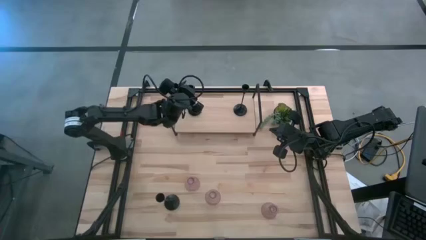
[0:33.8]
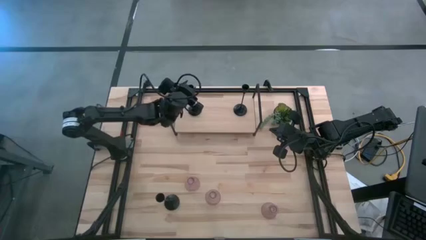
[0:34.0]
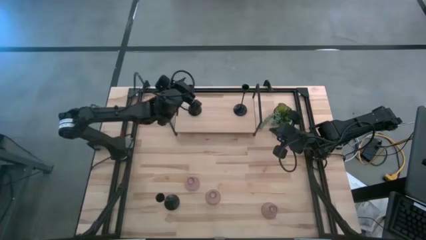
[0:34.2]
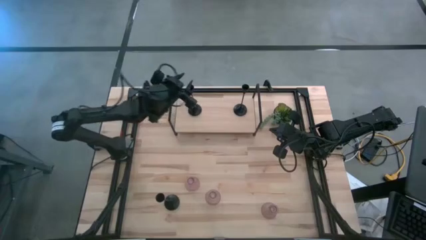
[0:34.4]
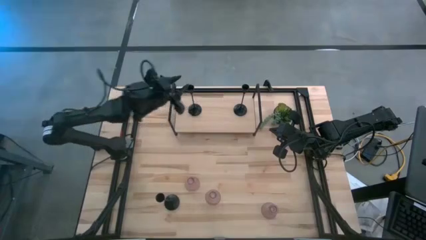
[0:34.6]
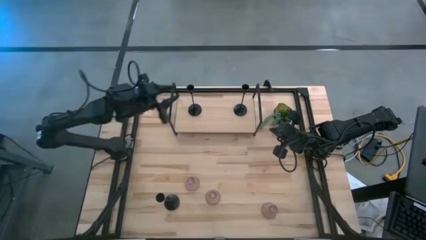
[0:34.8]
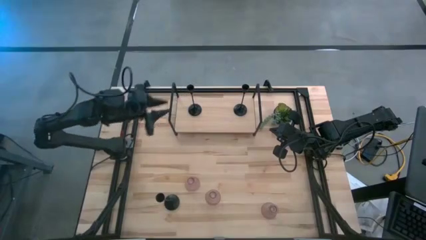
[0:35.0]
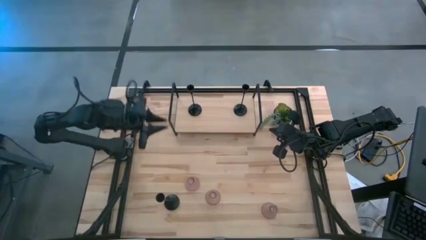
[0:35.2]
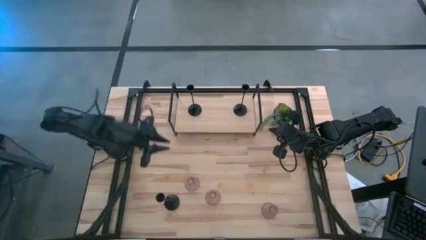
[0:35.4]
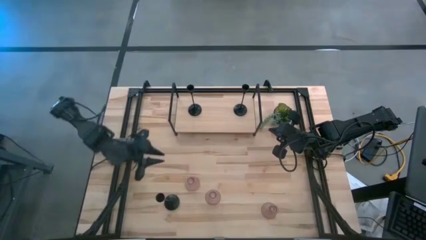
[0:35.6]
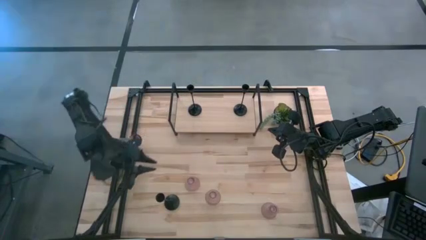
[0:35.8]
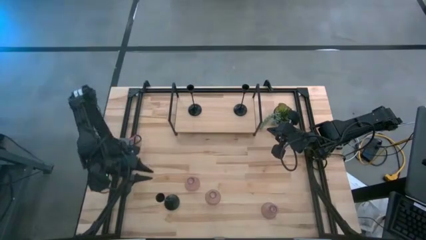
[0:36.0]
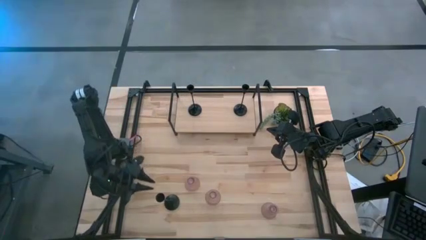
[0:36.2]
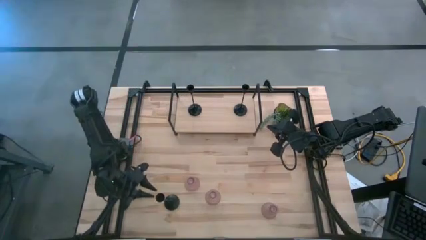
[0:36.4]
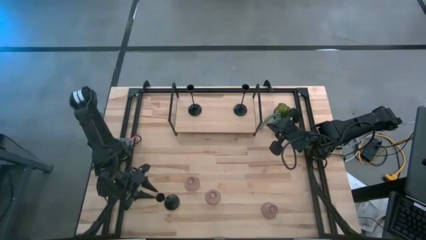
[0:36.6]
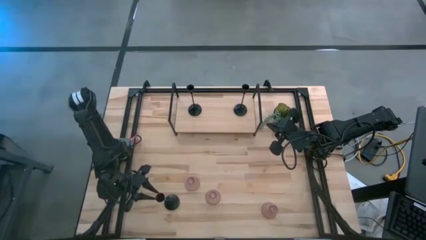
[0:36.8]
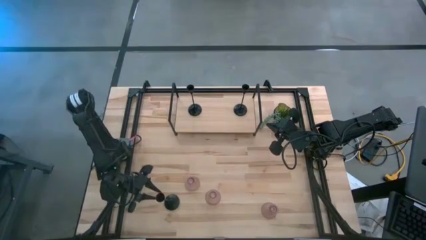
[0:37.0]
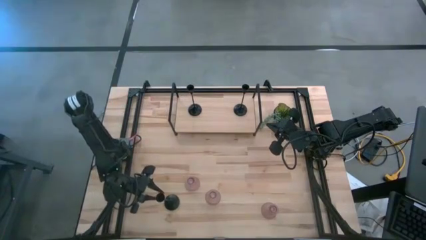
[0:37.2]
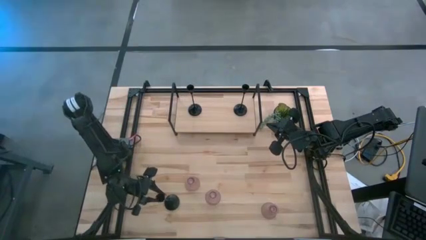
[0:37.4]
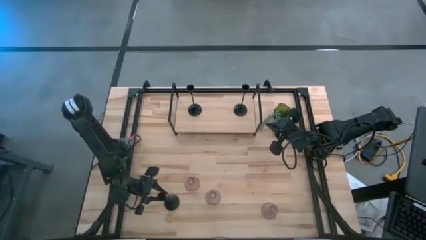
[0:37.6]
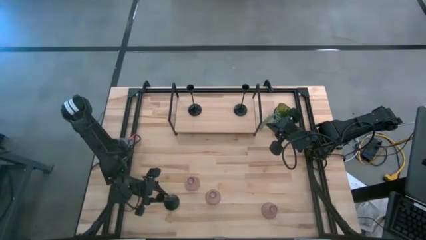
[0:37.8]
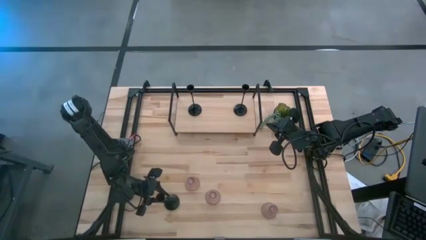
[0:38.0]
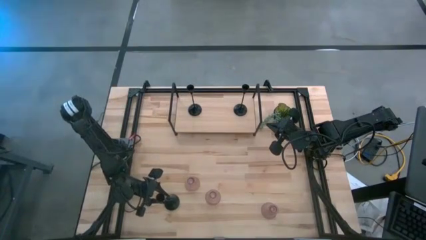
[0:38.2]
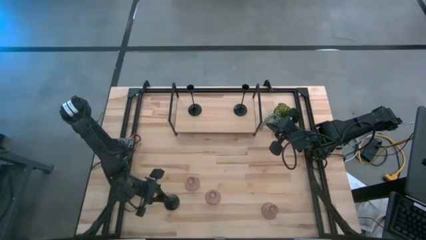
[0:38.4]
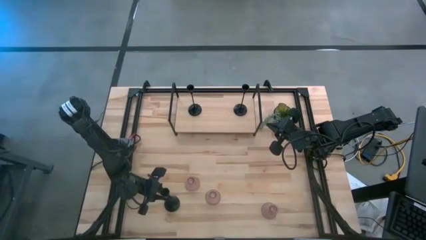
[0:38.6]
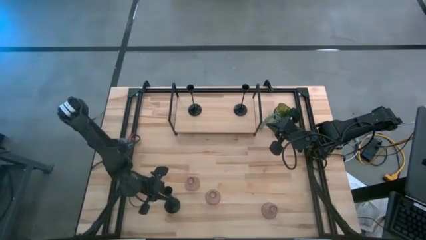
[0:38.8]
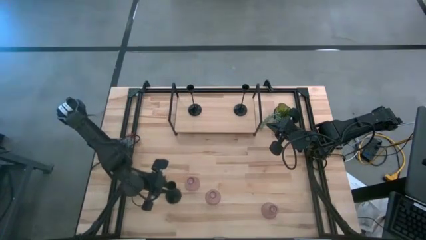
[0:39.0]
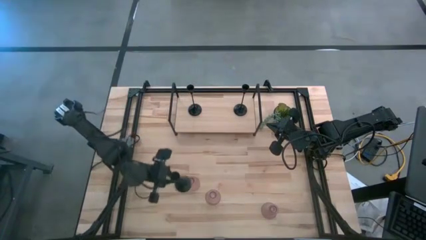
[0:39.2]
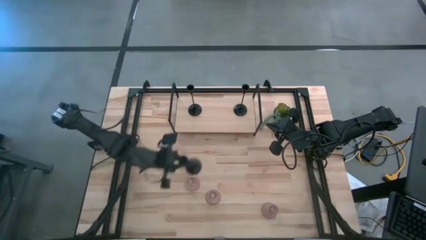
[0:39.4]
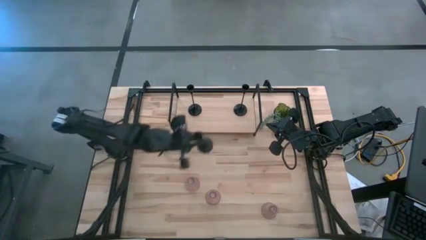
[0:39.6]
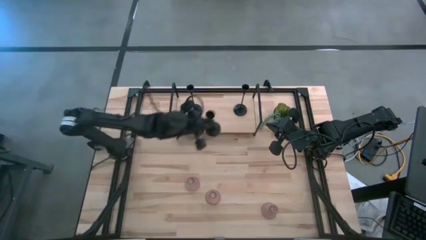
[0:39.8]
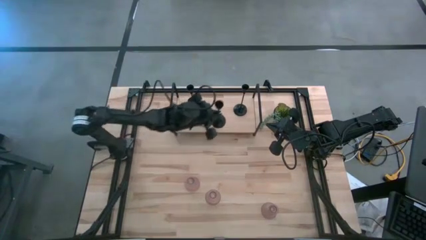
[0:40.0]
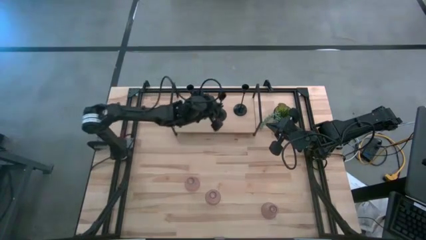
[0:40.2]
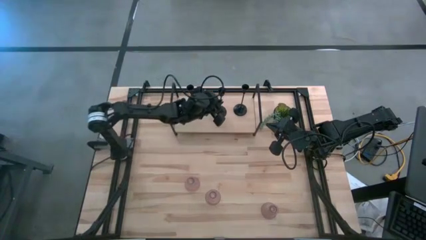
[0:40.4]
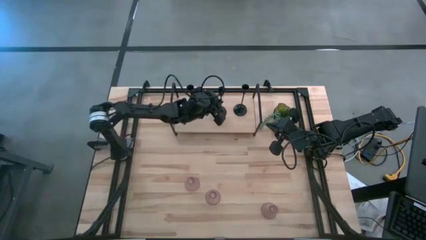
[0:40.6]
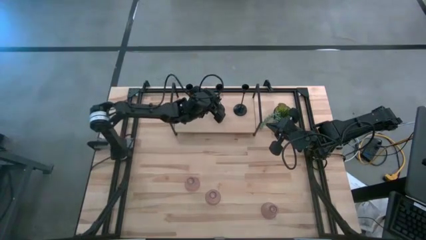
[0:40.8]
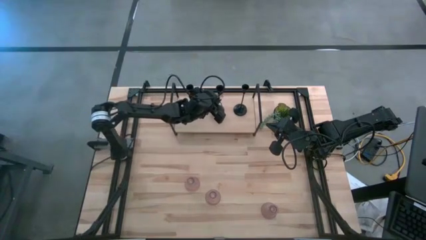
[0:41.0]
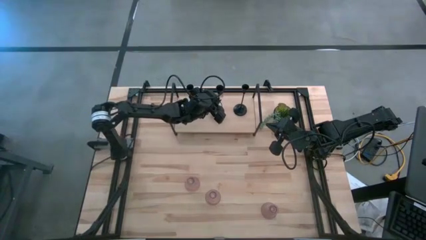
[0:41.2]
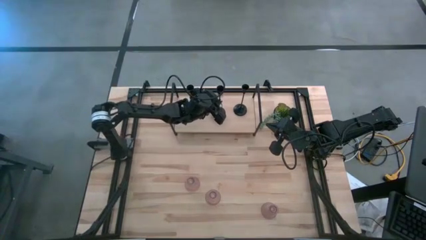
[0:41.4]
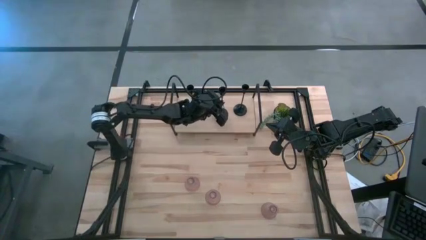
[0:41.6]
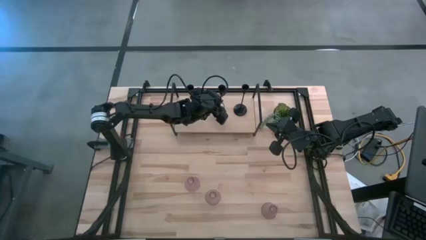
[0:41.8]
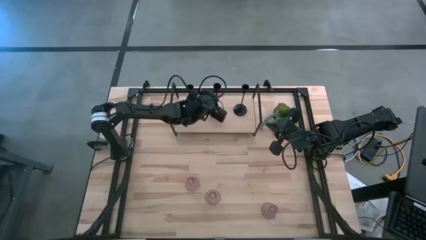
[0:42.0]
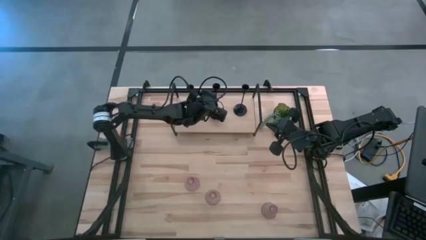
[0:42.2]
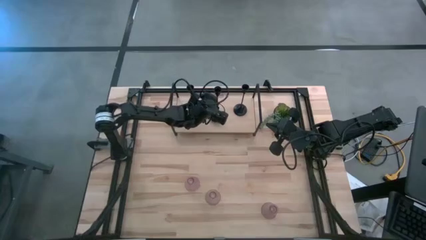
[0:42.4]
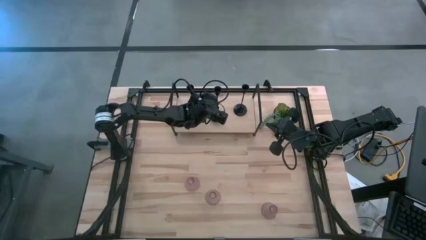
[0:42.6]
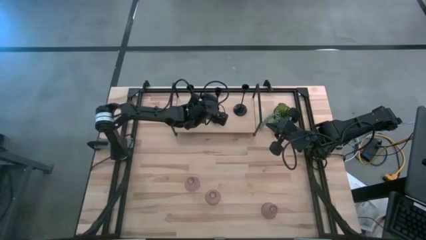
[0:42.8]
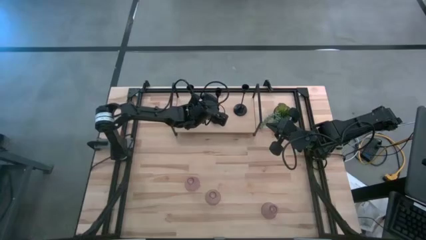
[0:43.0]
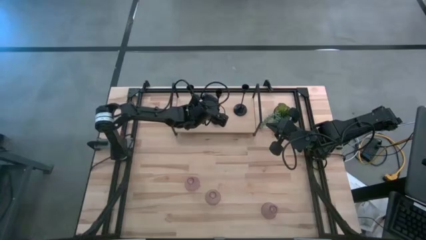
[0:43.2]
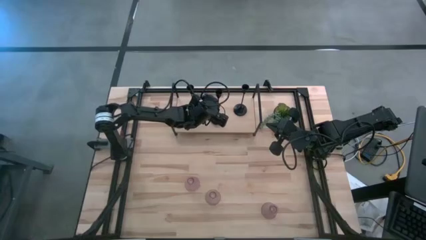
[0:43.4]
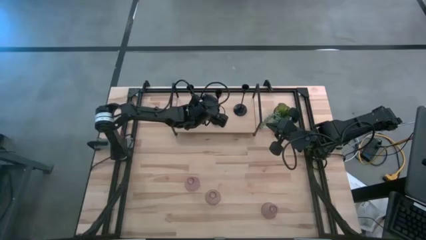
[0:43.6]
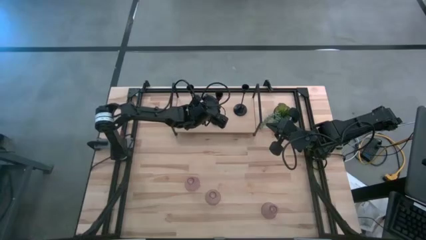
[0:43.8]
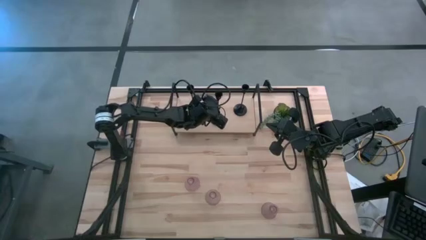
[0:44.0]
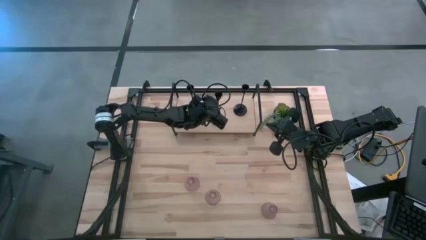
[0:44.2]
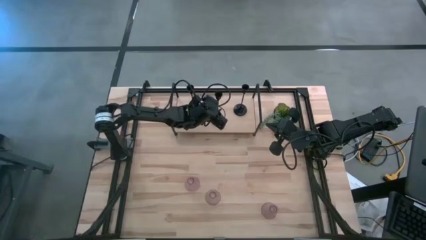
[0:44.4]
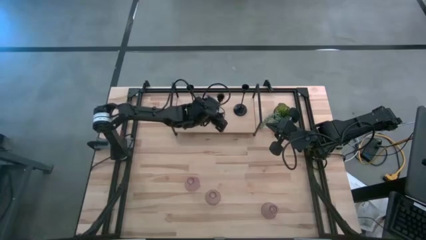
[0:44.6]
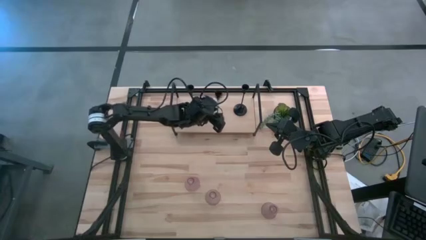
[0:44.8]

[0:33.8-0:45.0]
Task: Pick & Place candle stick holders
Put the black candle holder on the shelf
